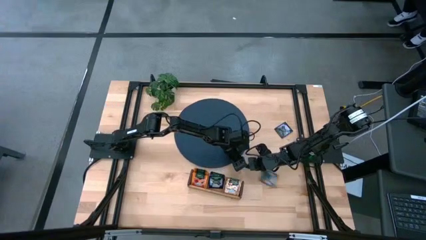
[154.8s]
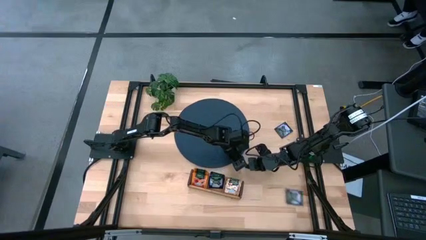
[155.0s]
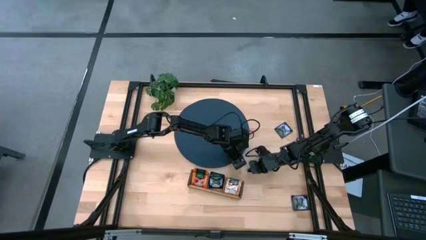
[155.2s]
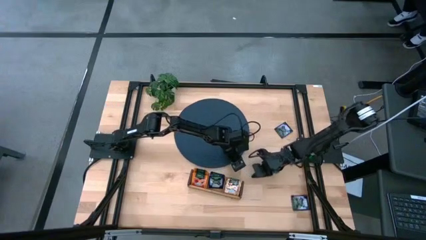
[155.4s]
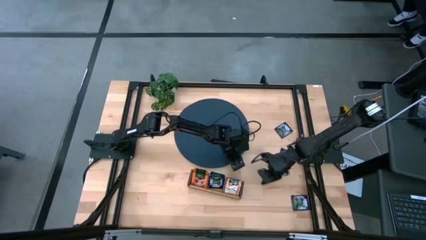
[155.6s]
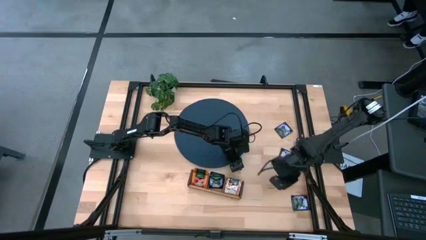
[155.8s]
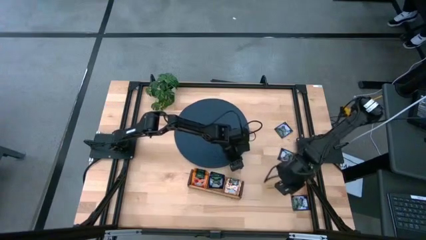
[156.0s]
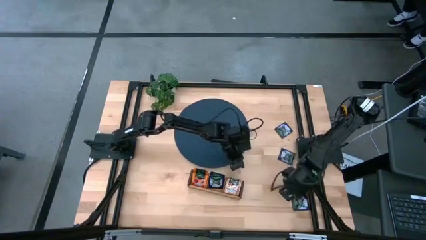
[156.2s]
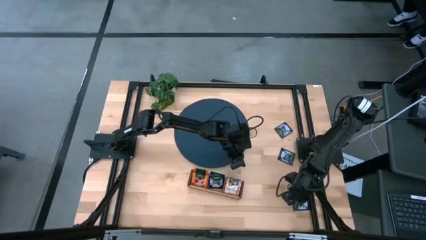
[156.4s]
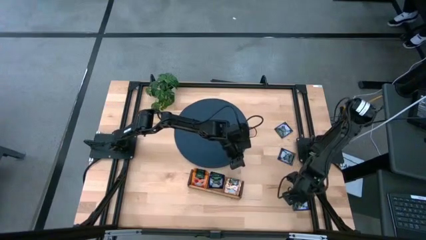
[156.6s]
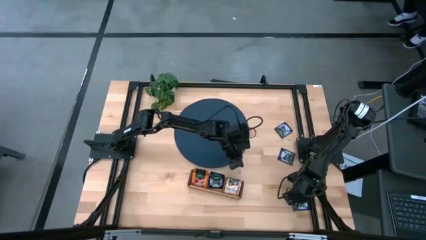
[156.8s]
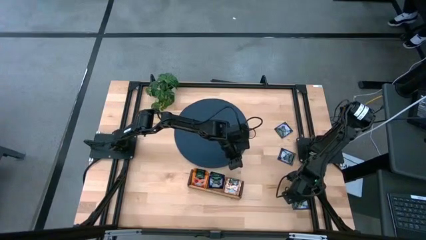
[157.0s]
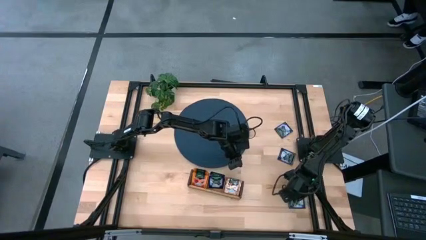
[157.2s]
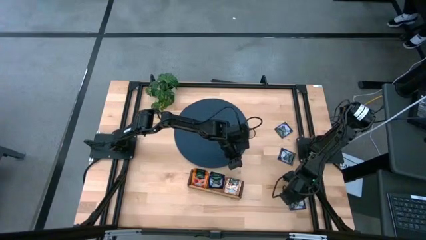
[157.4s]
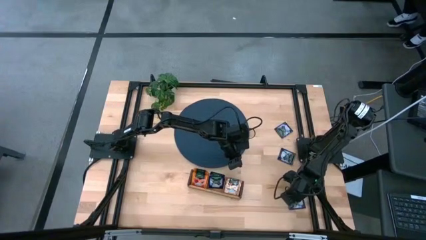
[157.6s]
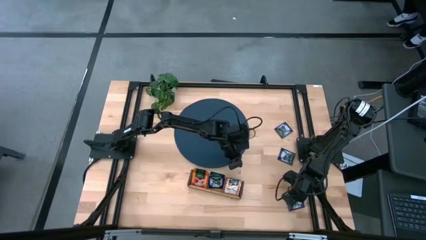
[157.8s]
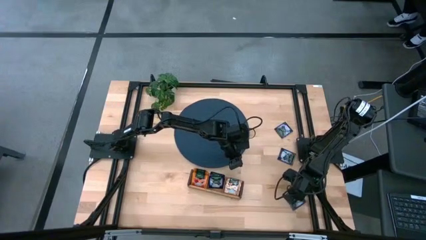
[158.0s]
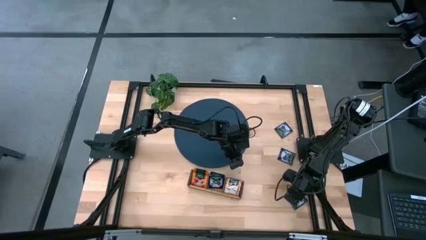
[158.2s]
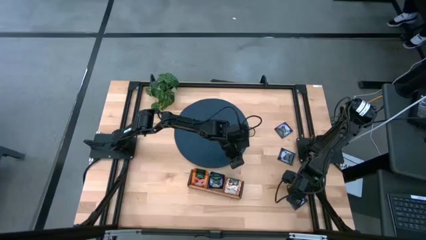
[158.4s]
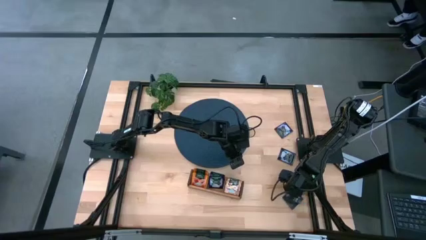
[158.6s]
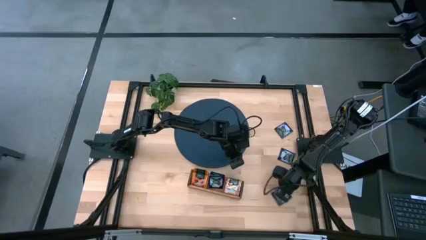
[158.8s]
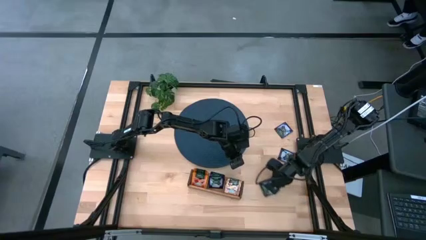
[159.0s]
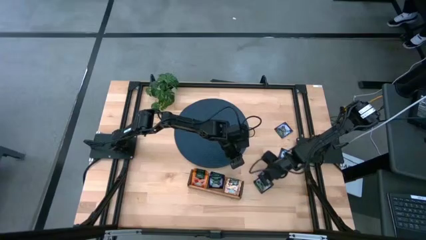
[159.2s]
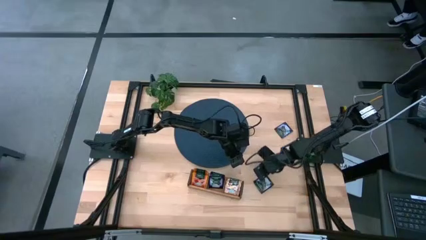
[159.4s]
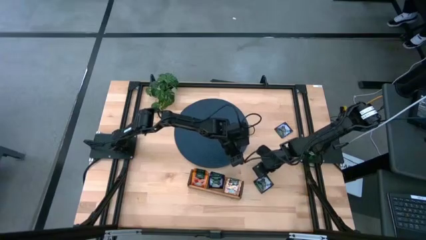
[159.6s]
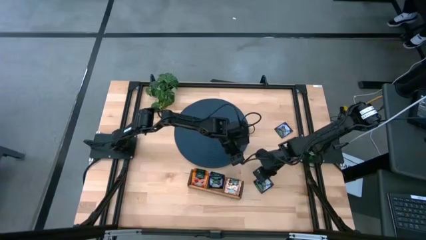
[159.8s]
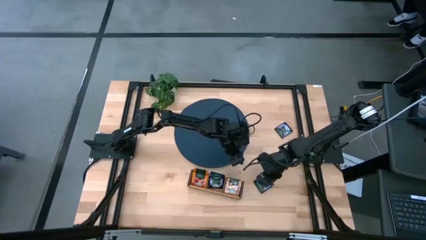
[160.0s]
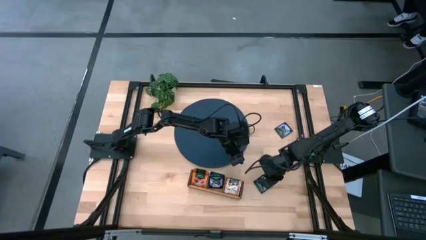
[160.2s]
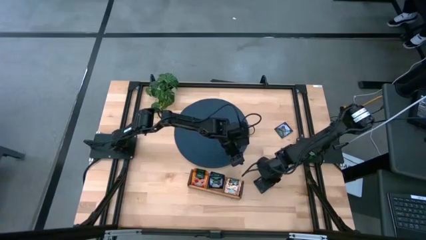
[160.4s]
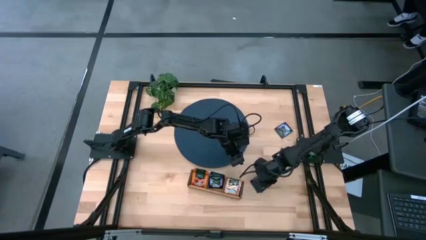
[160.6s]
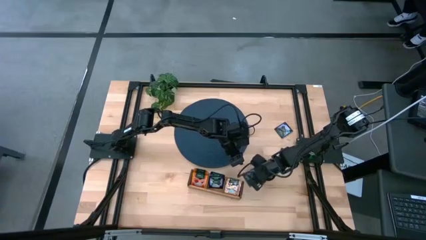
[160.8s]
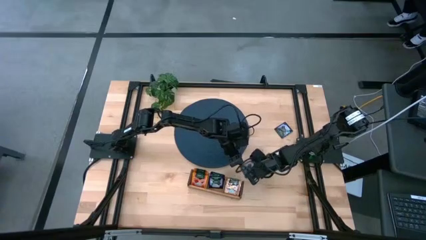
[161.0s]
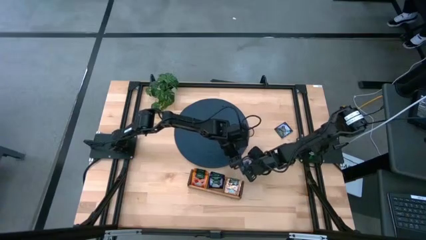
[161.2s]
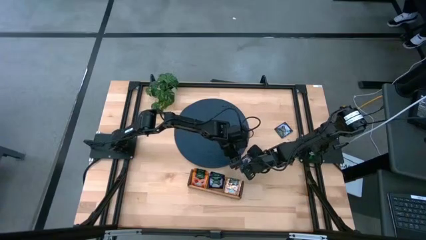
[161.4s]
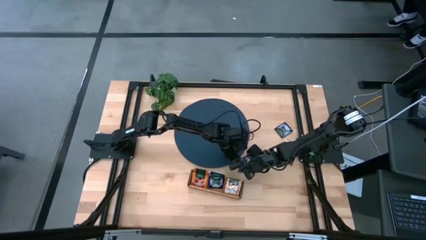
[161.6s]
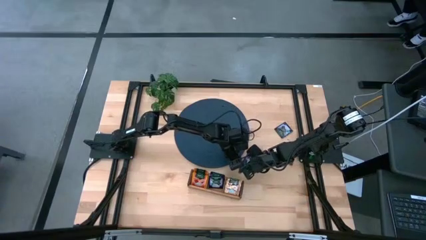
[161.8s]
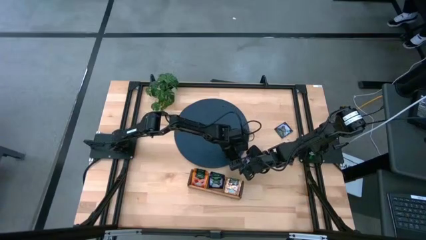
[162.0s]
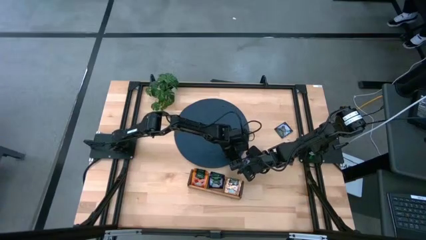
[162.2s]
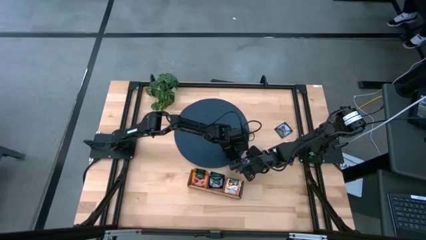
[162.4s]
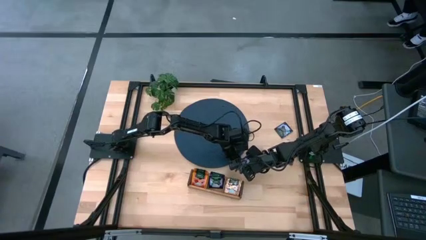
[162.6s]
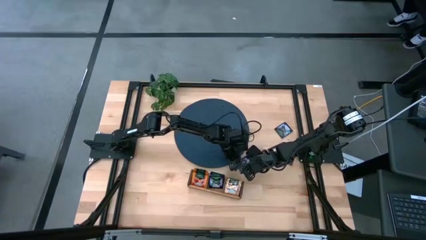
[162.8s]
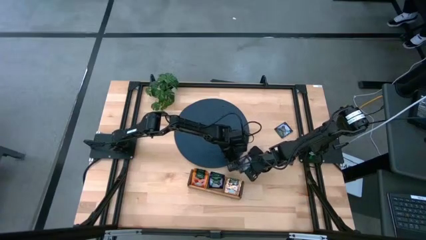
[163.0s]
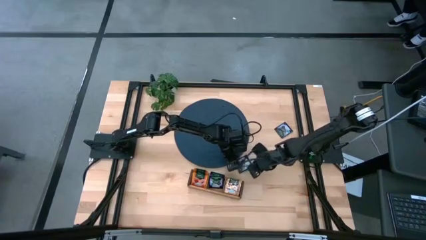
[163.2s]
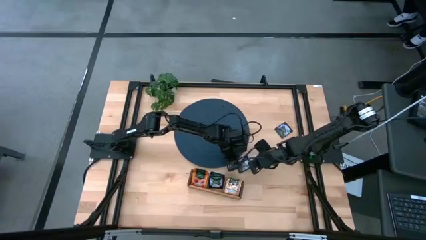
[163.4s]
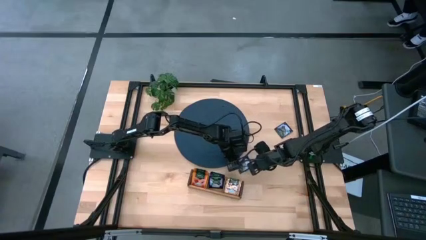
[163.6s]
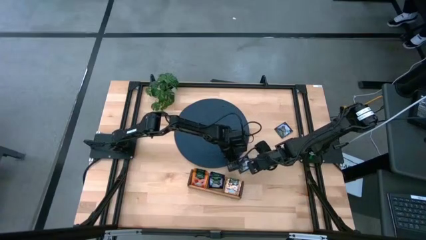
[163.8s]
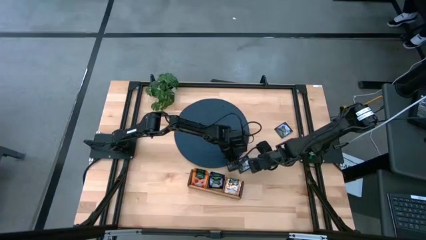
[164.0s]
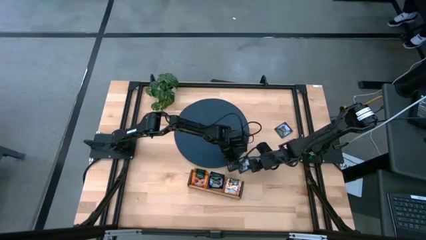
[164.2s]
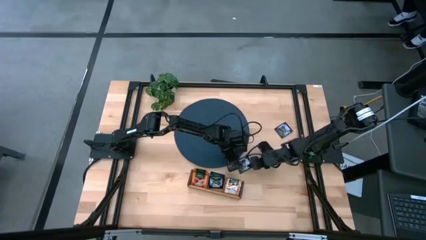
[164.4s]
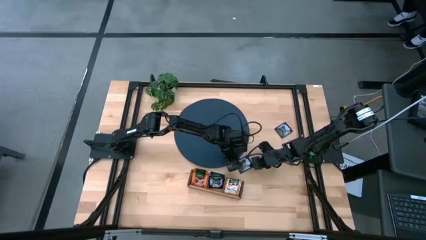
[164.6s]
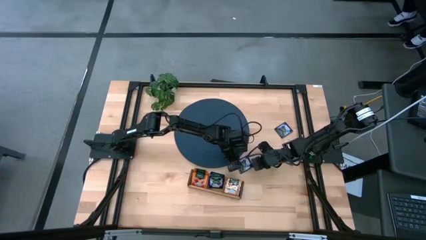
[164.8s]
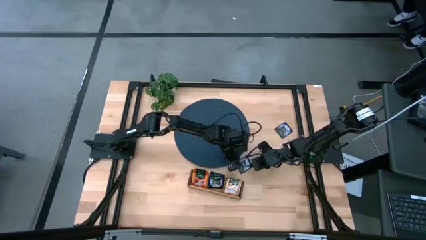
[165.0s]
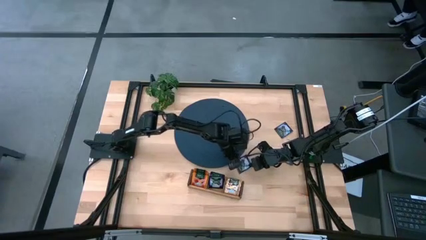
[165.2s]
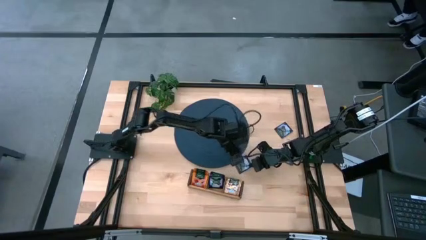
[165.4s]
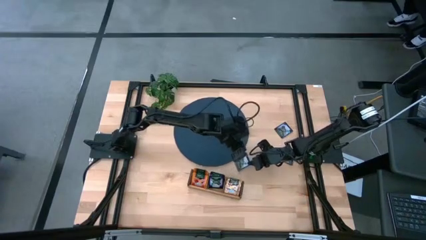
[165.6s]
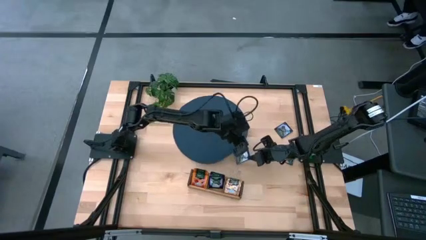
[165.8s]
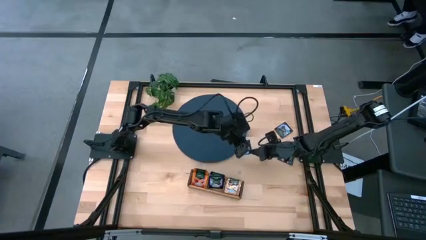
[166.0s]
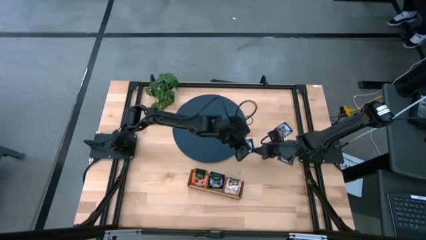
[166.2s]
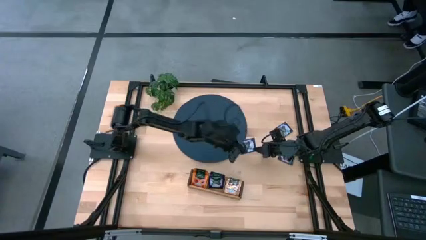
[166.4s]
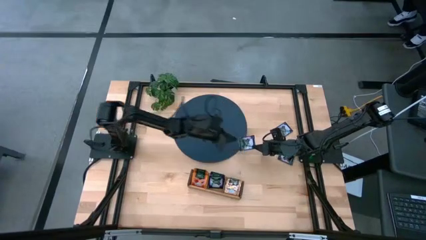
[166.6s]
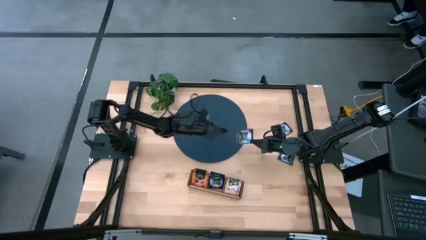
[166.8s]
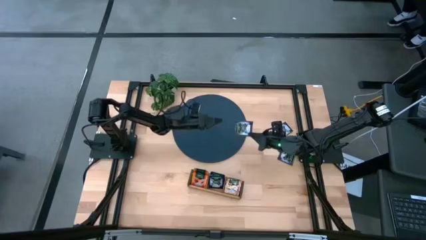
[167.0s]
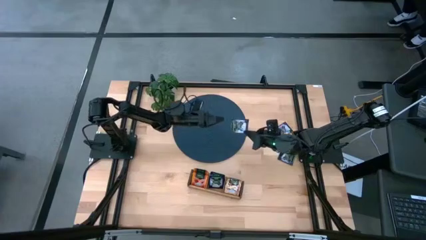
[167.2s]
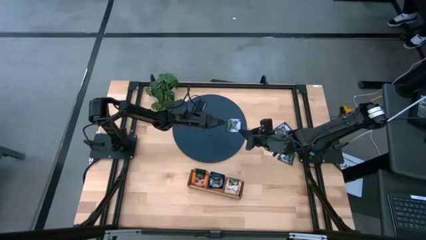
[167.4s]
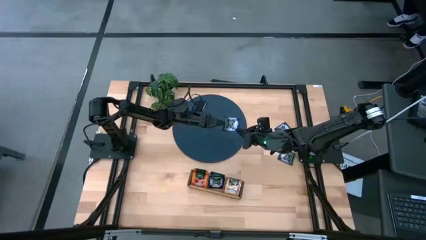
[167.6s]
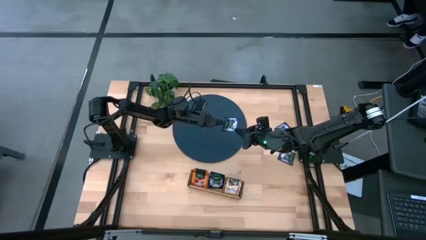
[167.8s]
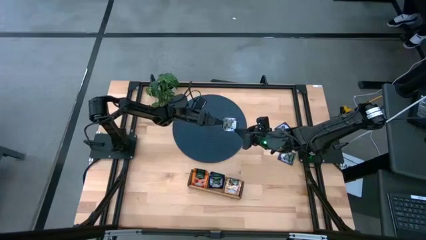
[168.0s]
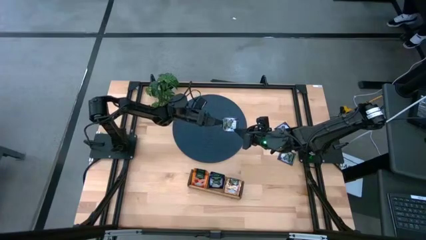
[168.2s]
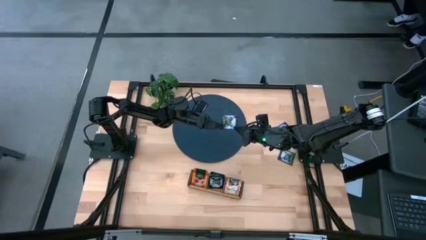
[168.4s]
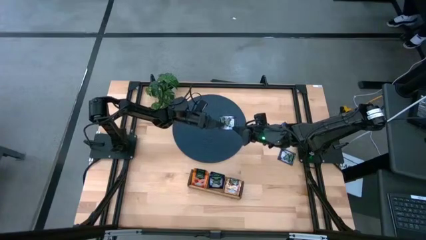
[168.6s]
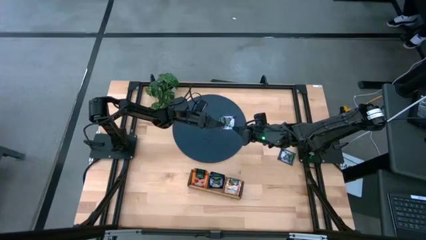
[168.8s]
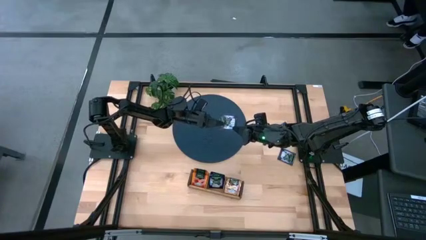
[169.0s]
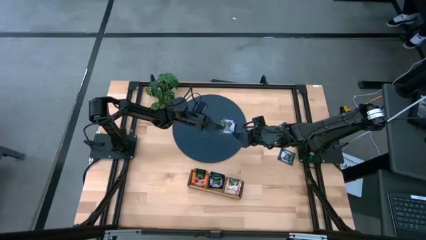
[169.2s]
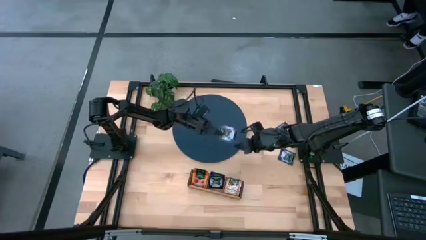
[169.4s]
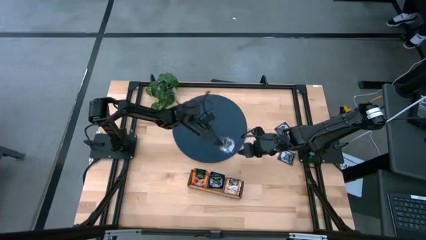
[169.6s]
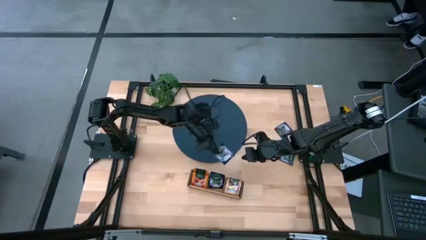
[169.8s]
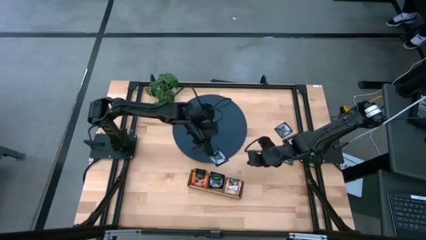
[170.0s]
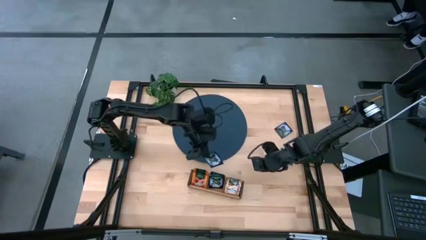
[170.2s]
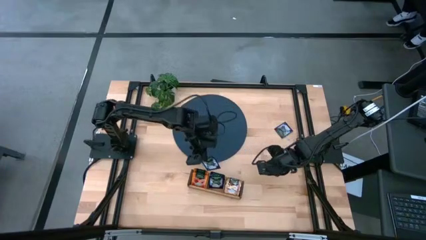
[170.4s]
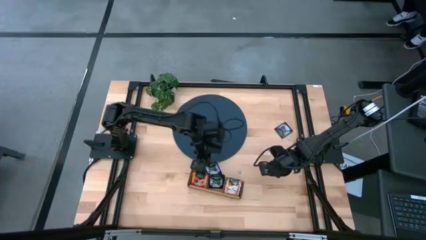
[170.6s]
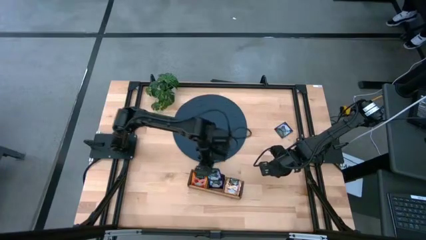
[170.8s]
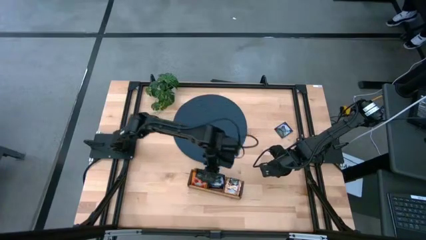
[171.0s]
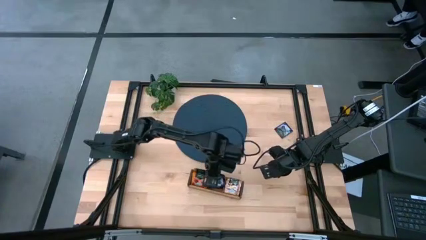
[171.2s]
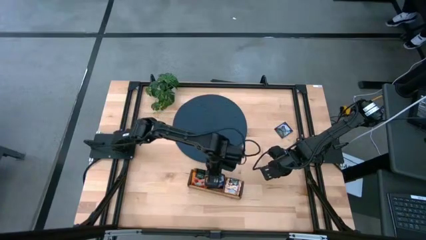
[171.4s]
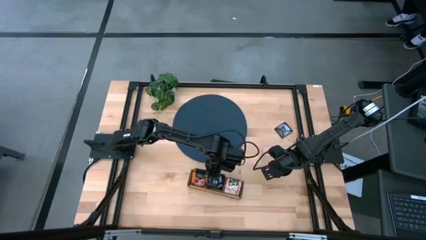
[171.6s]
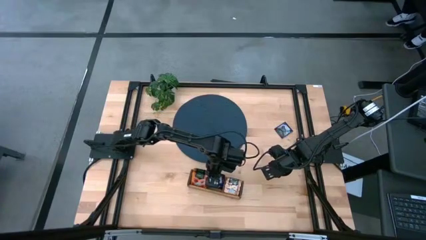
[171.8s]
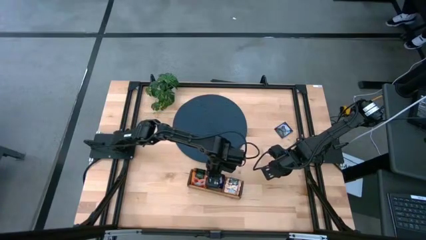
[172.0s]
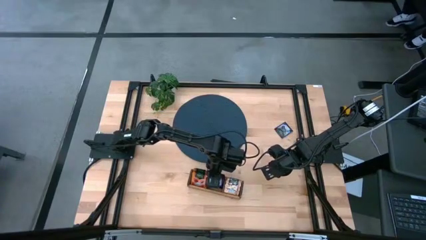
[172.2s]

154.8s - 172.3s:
Task: Pick & Place Tea
Put the violet tea bag into the middle section of the wooden organizer
